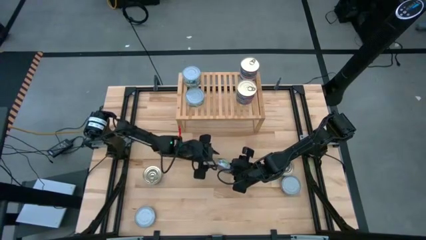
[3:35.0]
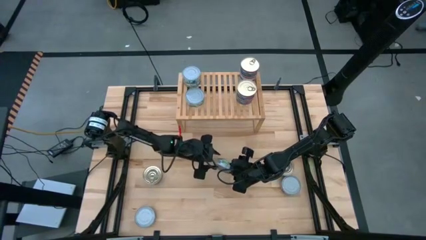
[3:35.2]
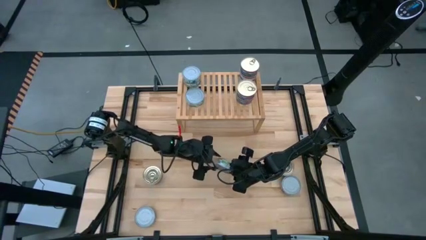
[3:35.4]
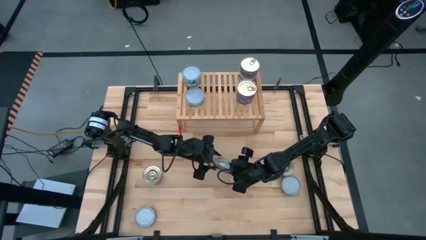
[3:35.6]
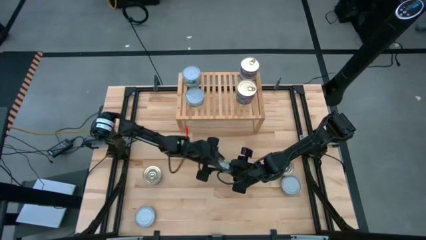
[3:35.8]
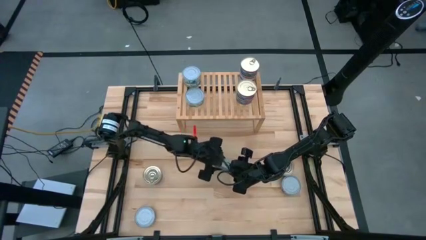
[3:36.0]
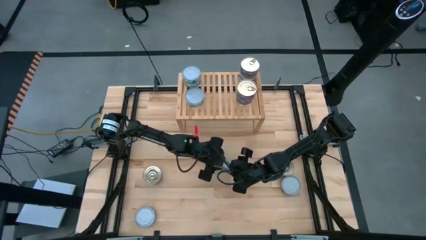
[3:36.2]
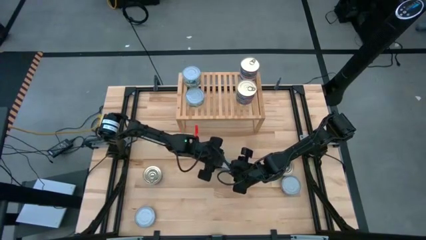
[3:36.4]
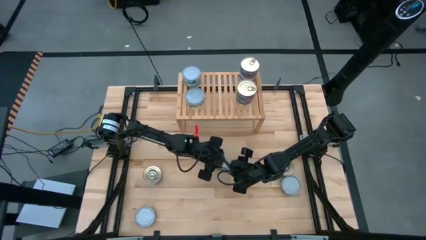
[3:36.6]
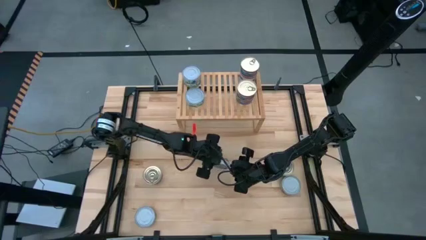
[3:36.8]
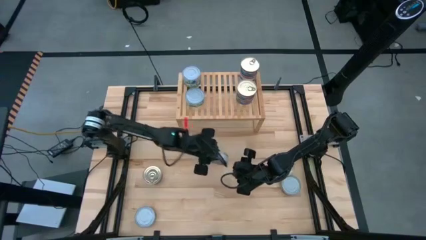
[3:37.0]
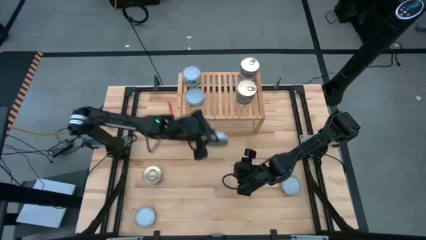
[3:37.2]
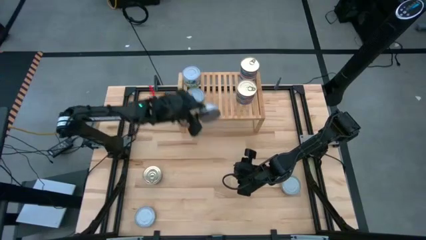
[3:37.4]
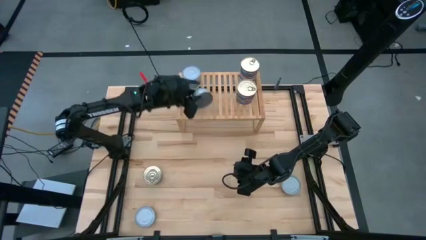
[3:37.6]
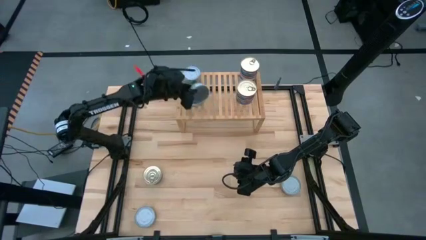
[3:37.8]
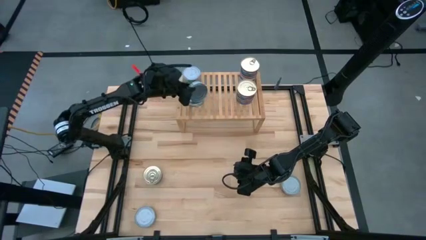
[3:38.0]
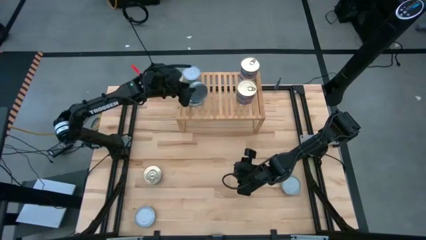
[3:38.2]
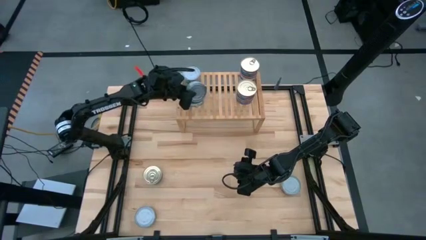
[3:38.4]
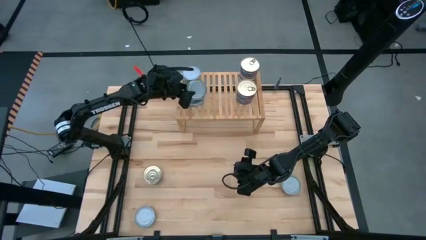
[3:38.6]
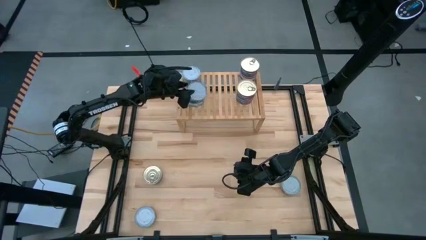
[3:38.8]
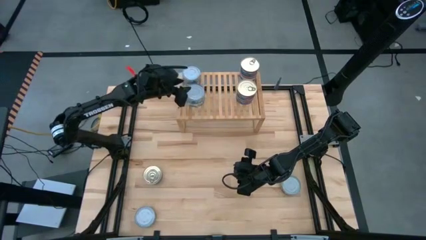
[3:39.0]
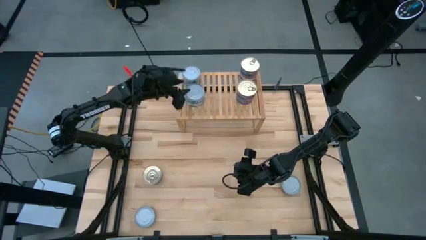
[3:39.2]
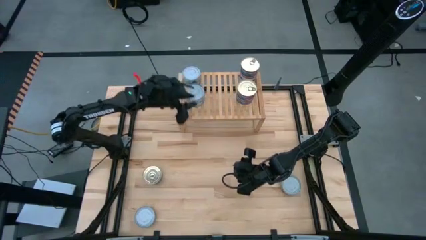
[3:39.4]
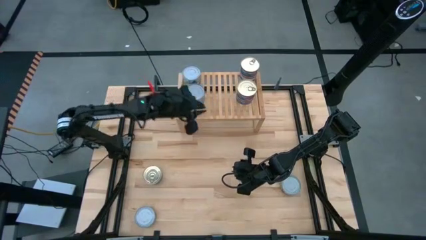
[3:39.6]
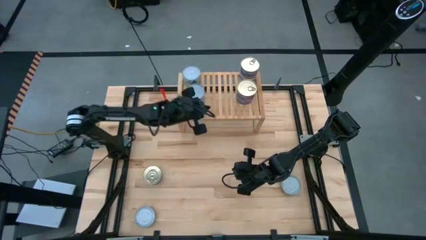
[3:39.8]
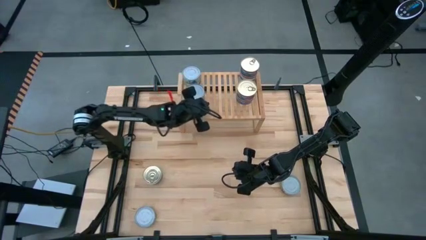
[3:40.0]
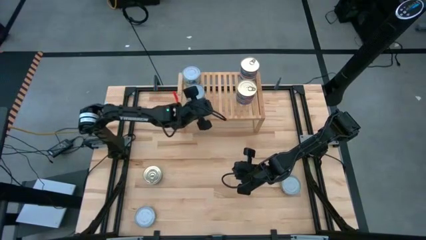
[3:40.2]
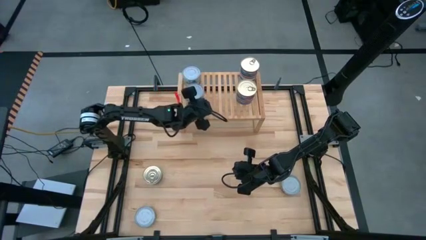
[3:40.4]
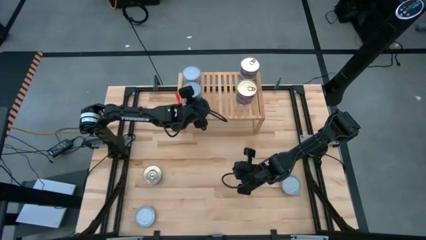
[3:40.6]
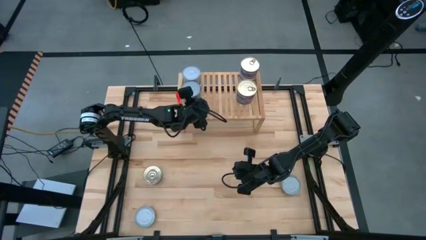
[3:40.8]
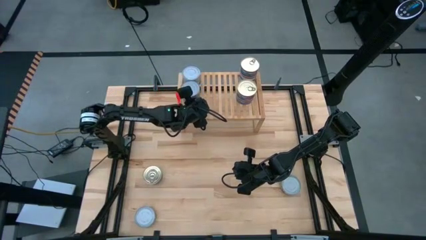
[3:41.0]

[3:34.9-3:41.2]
Task: Stack canned seafood by type on shelf
Stack the green tuna can on top of the other green tuna can on the shelf

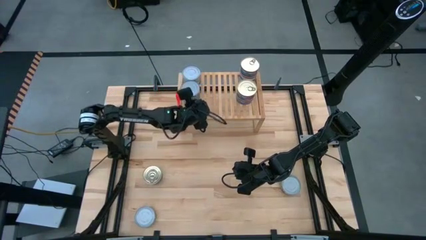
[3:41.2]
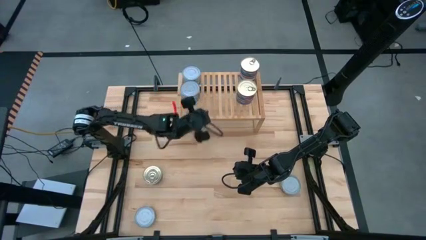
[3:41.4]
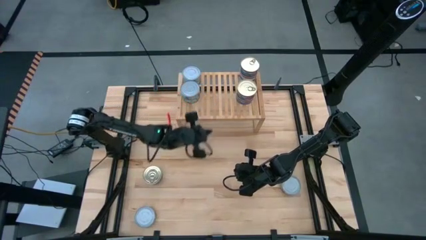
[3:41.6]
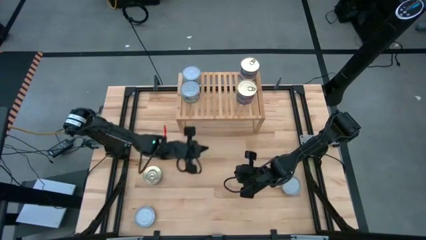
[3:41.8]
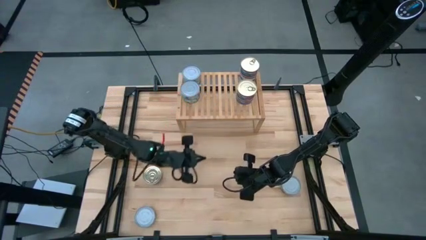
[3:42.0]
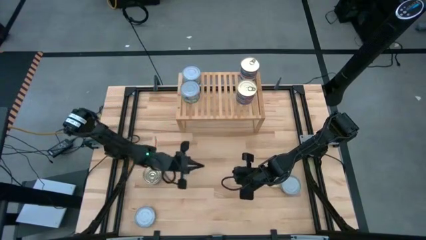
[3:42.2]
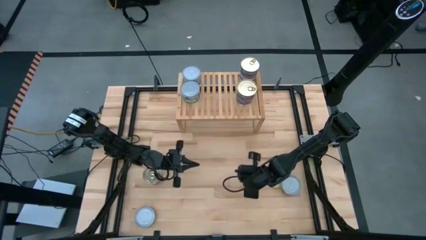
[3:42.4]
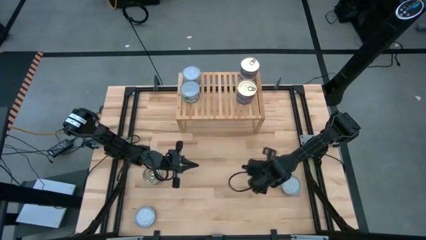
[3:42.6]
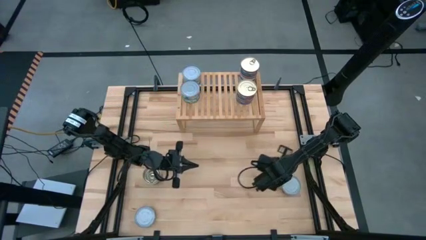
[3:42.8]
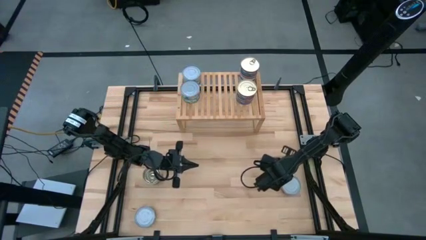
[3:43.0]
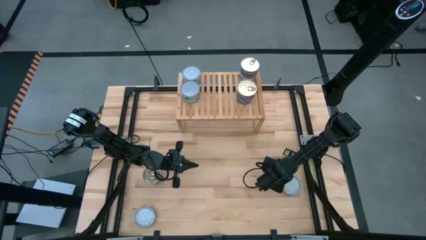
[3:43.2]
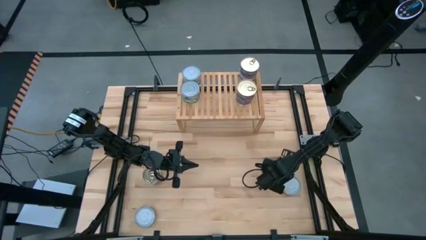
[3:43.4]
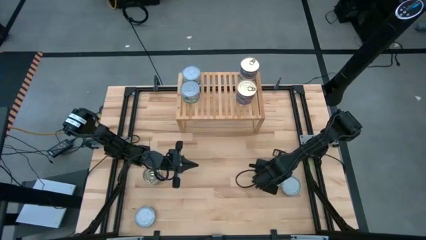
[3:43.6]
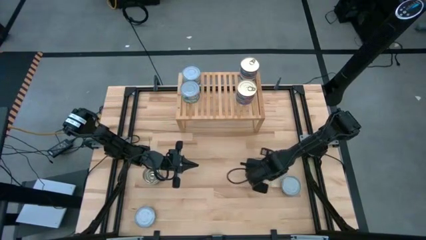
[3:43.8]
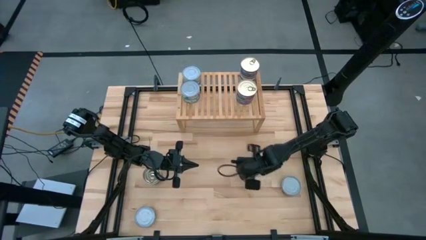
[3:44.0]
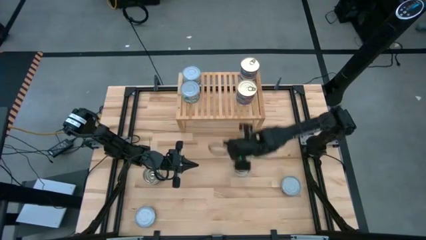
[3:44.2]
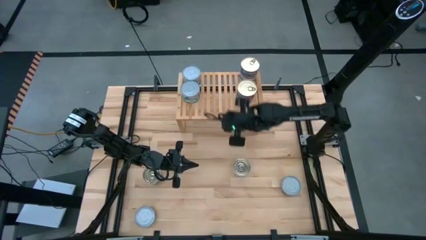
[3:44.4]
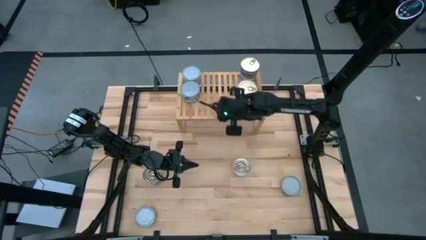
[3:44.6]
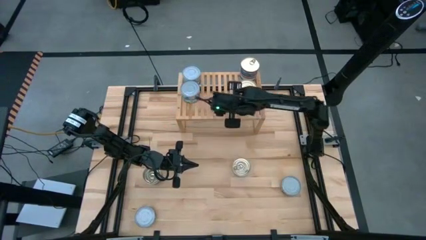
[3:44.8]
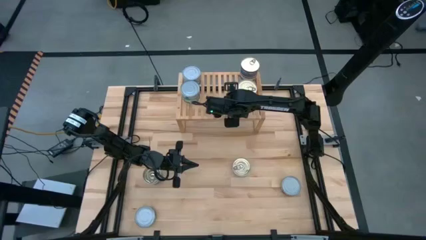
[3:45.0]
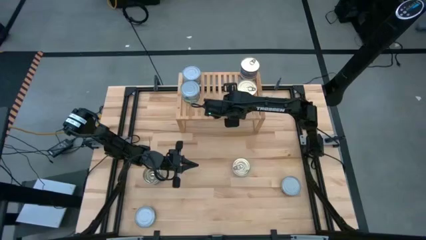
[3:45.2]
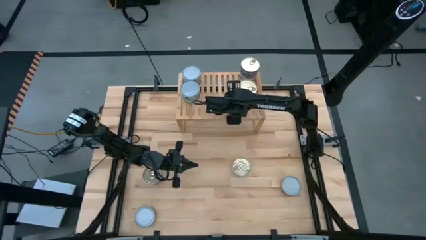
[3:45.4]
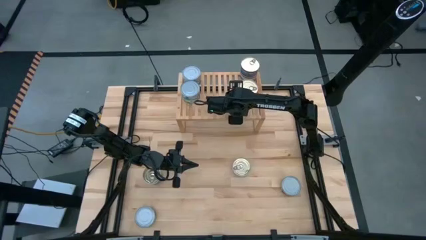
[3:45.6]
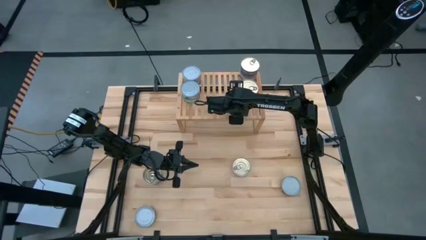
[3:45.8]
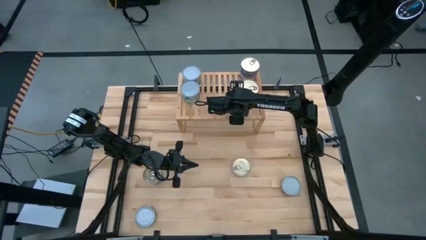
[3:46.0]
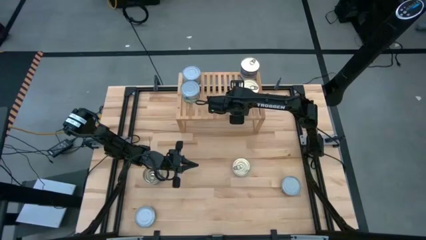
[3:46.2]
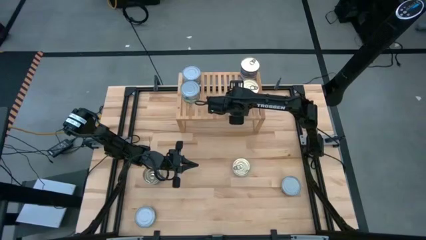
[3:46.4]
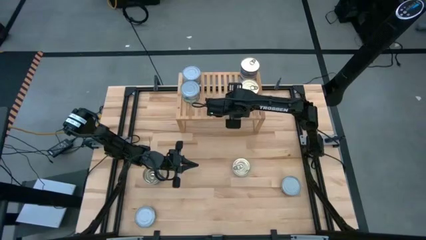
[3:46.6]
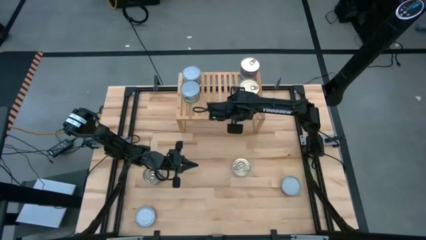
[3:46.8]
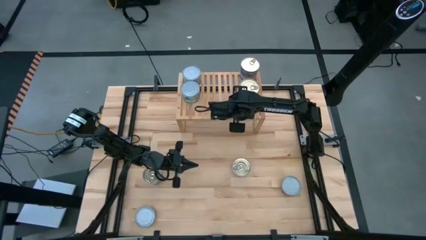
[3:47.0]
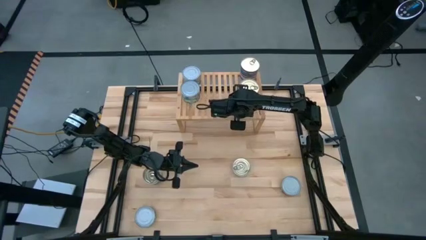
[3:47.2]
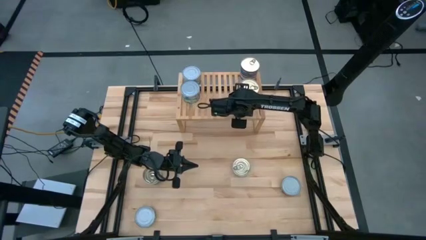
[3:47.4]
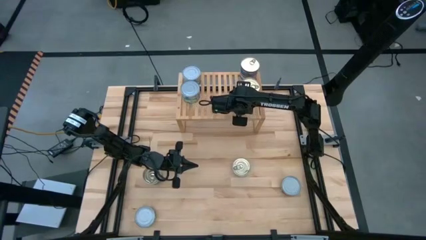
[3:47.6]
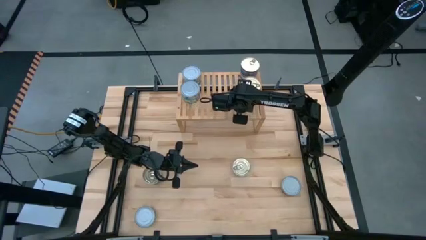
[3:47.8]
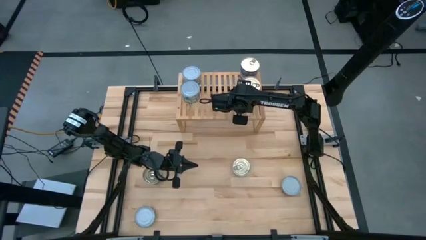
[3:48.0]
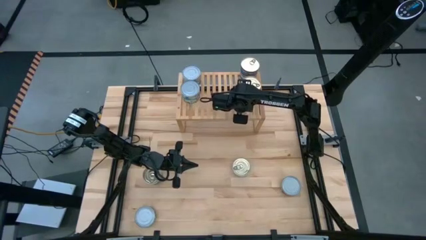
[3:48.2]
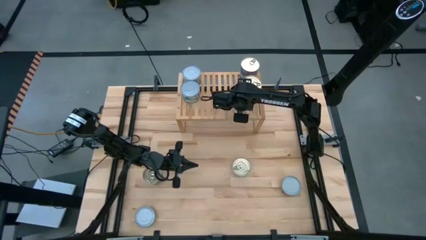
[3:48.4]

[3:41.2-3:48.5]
Adjust the blue tuna can on the shelf

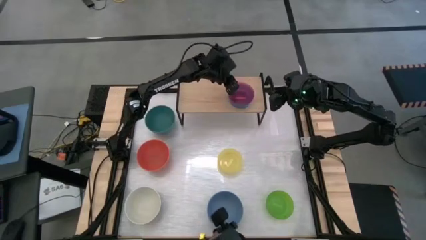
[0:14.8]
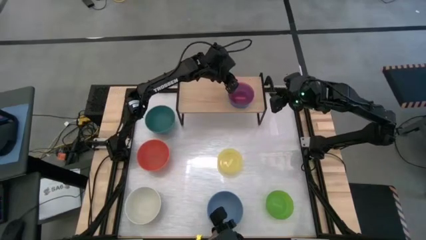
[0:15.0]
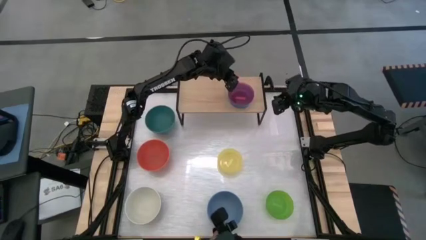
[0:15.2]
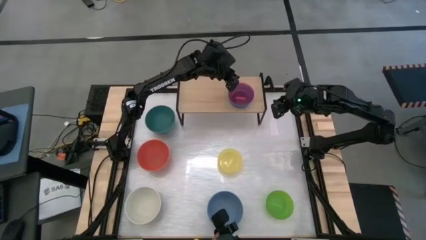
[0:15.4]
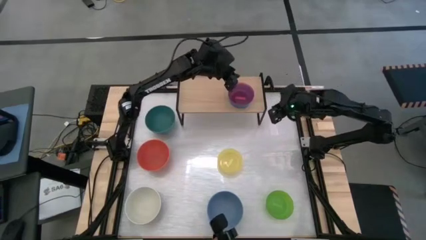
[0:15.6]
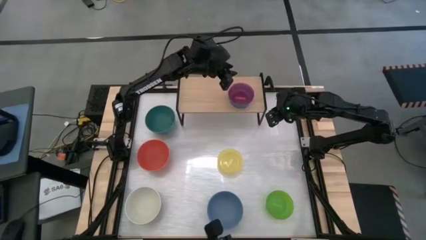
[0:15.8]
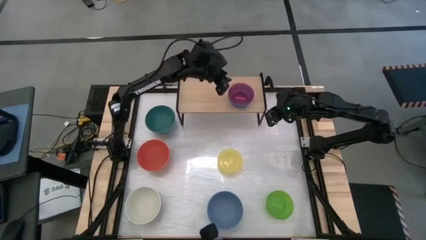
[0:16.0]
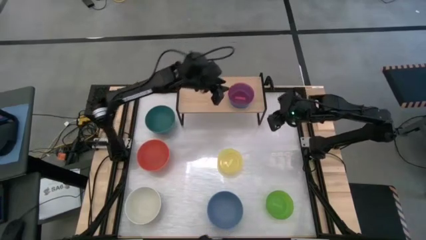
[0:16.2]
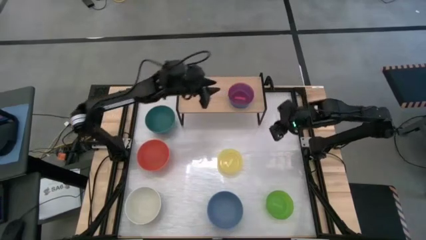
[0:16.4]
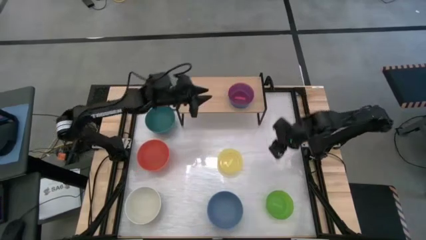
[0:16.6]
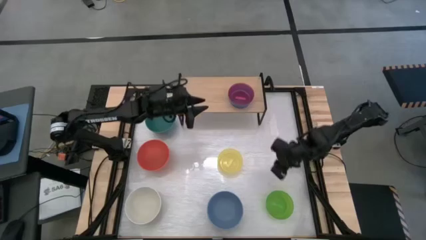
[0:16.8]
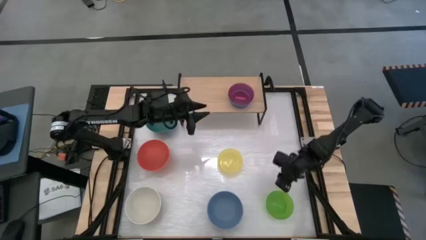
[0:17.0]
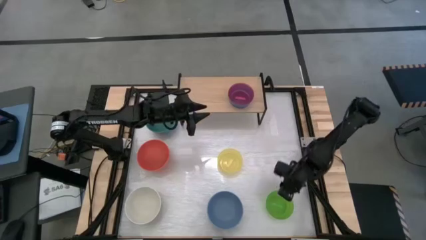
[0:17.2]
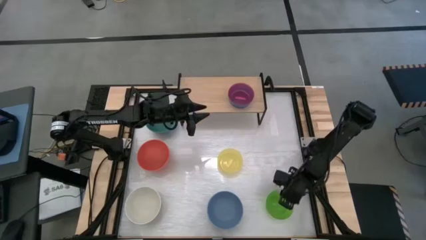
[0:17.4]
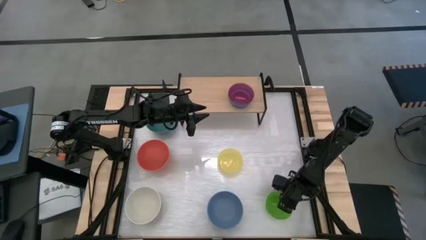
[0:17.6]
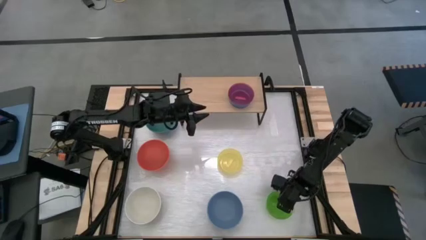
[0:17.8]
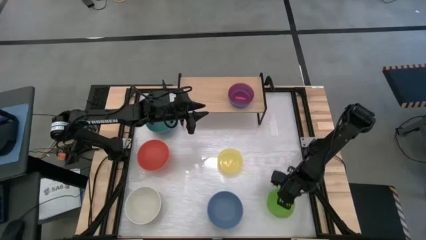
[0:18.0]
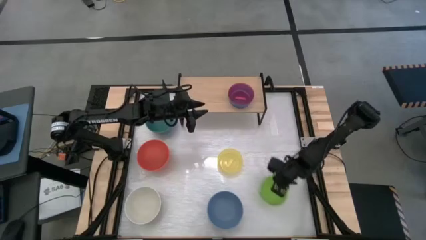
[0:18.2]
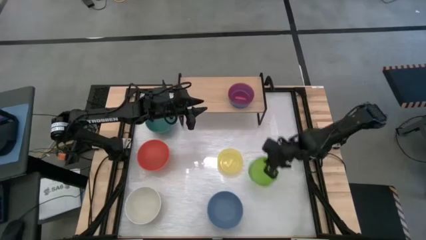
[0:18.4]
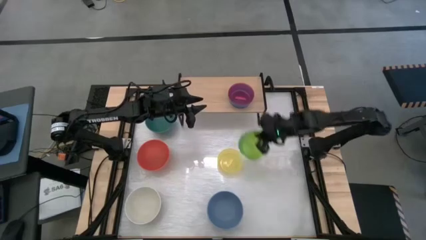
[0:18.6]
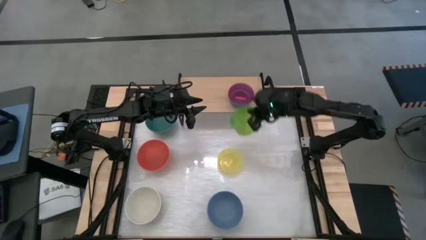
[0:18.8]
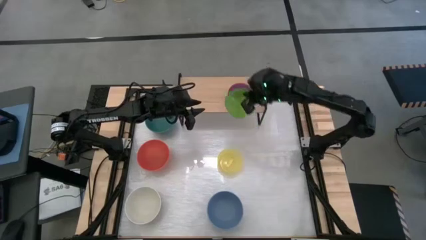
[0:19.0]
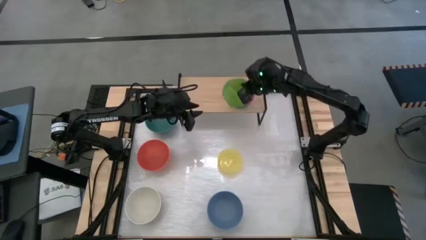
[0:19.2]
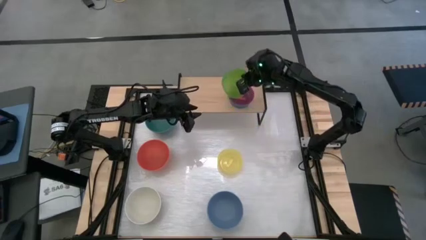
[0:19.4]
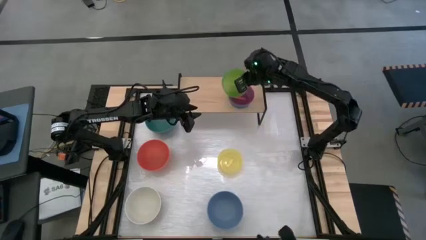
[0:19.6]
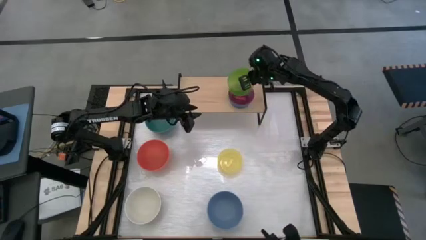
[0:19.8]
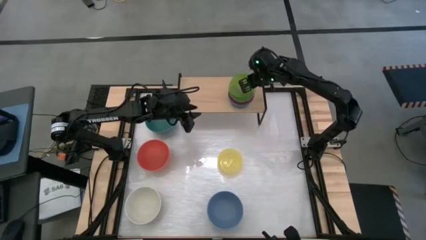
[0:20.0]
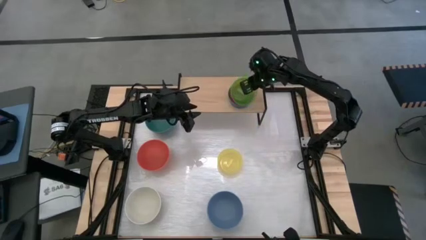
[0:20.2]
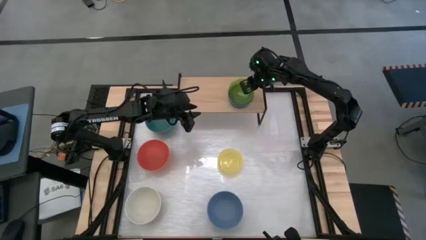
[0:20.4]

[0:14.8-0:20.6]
Task: Place and stack bowls onto a shelf
Stack the light green bowl on top of the pink bowl on the shelf
